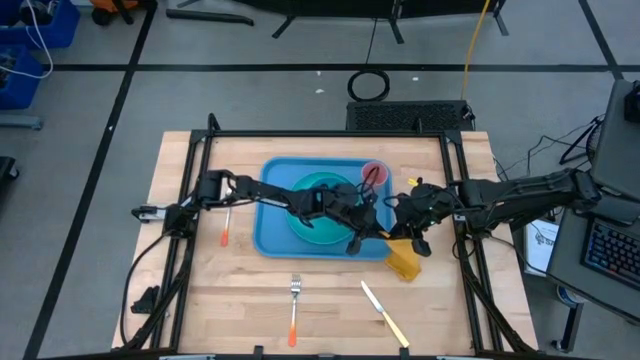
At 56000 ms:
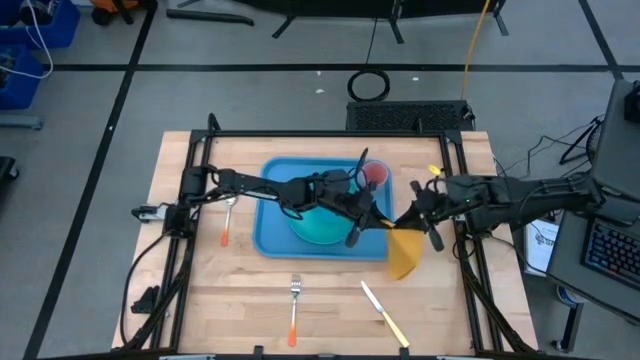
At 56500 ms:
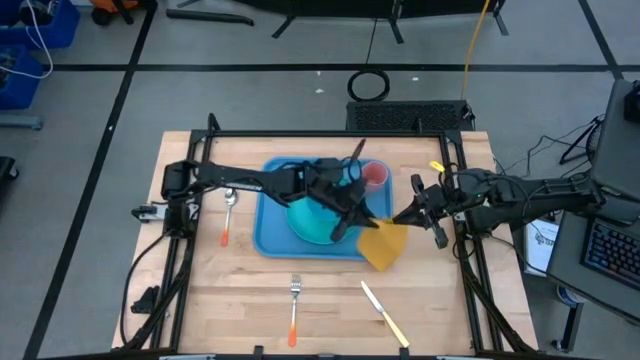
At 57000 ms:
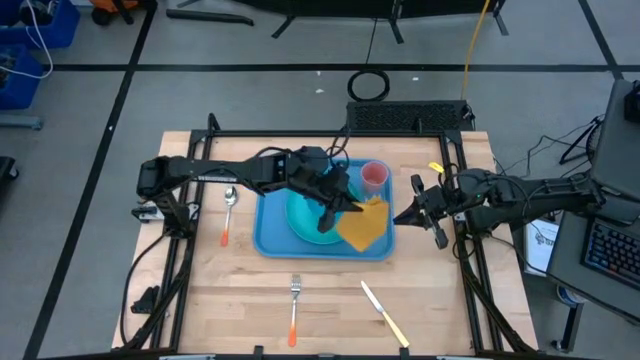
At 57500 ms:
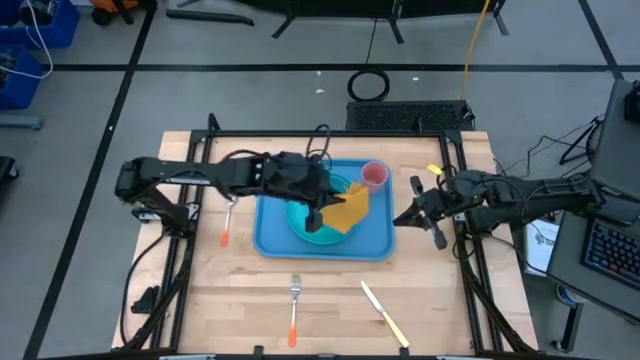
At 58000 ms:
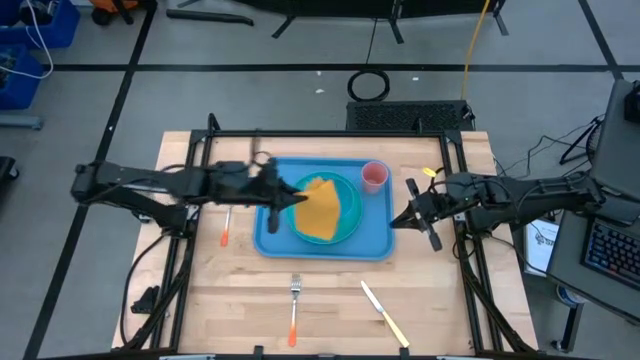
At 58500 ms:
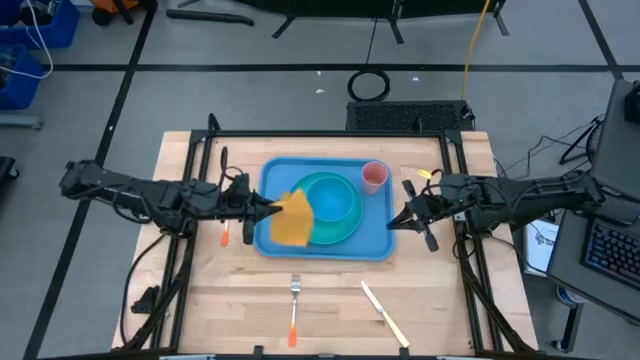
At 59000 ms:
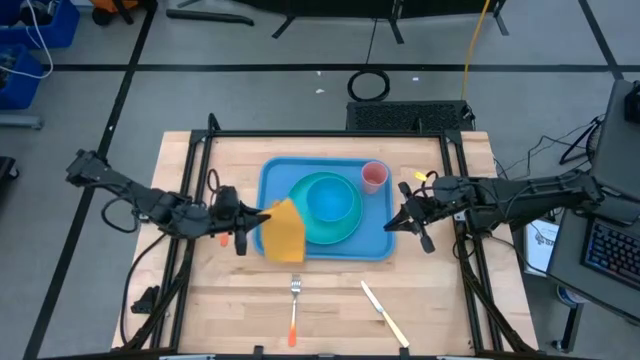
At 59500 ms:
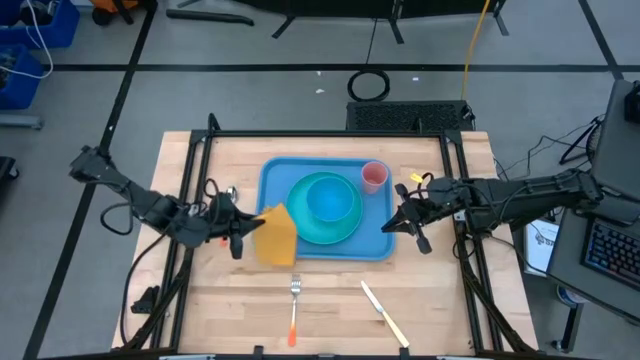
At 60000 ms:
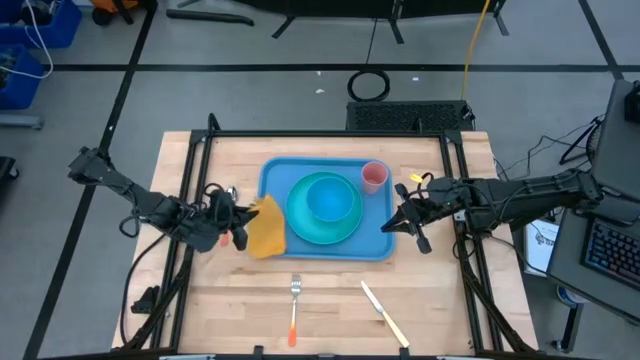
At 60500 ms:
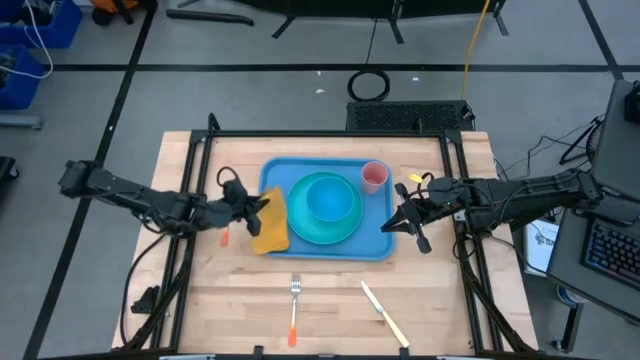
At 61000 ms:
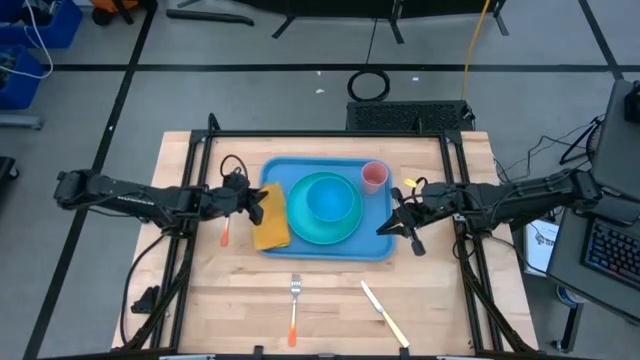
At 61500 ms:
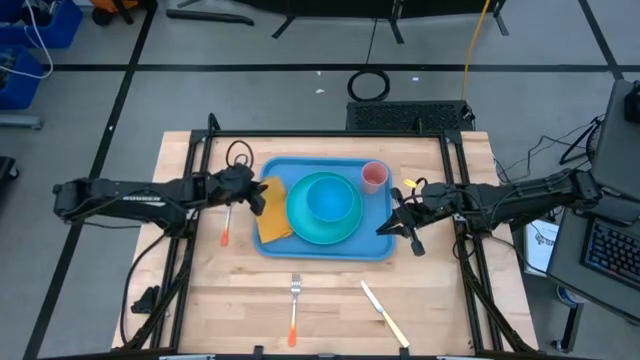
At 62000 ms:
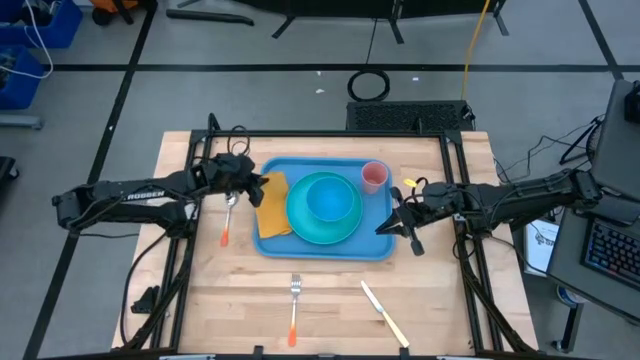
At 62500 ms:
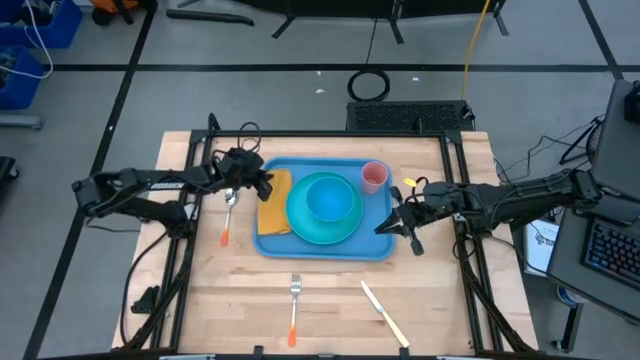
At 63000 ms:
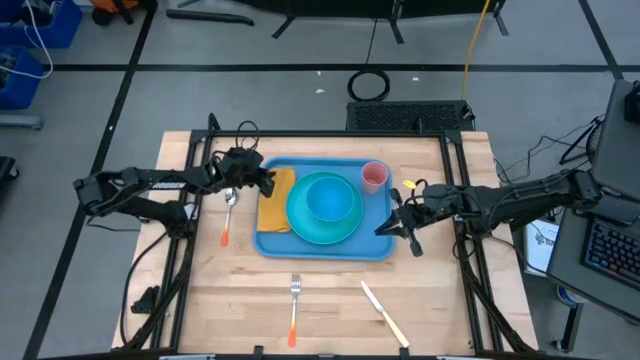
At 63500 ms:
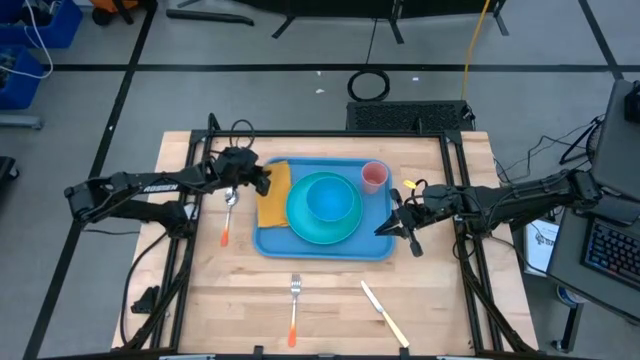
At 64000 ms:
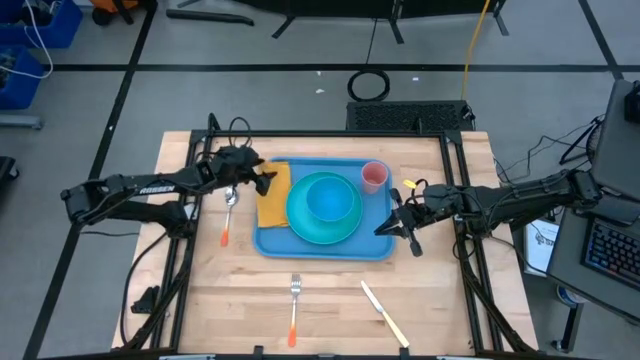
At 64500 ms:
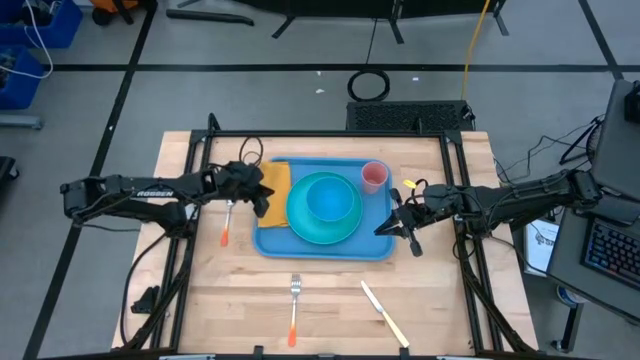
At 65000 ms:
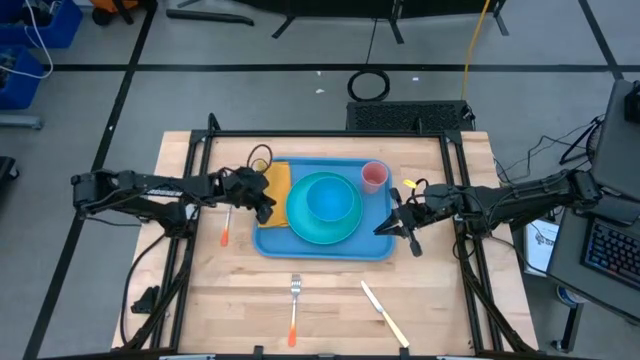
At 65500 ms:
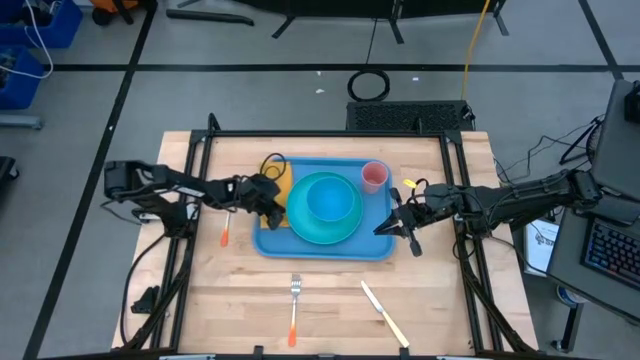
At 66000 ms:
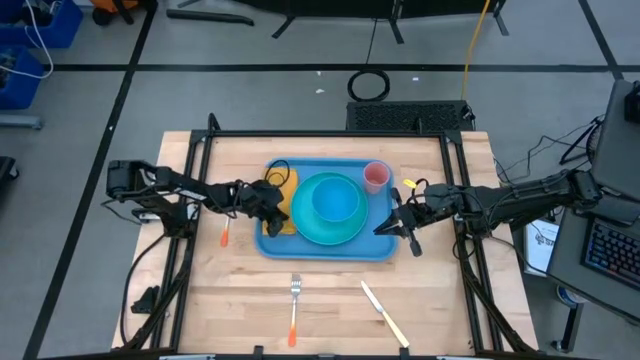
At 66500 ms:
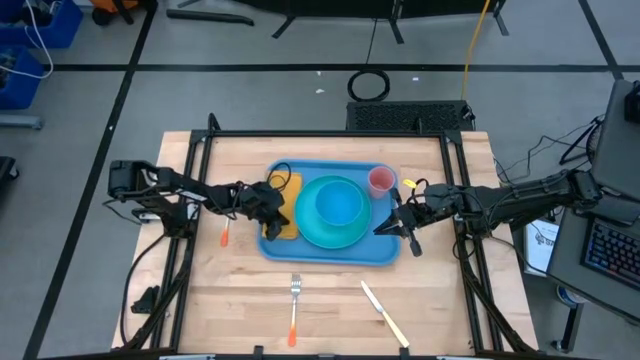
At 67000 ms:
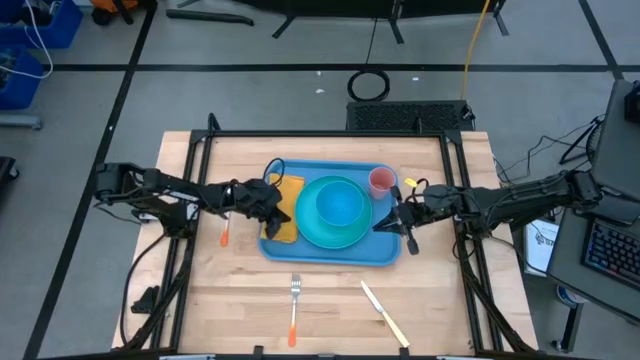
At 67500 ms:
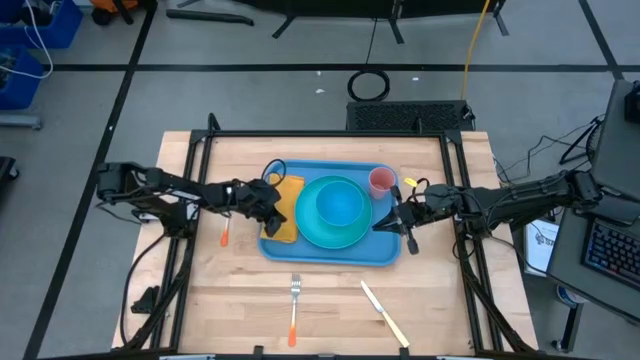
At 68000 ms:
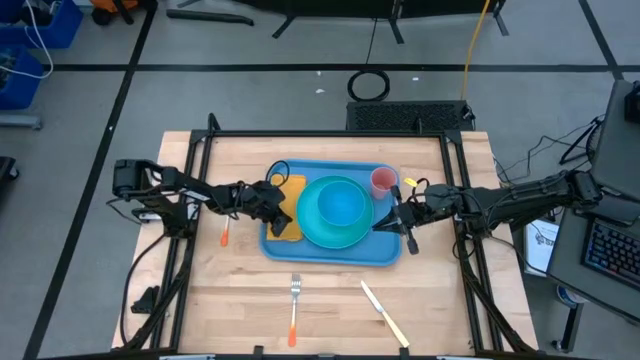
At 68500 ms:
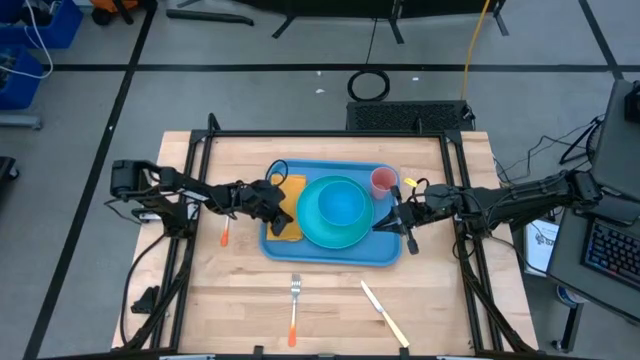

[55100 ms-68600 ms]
Task: Set up tray
Put the yellow napkin to the left of the green plate on the blue serving tray

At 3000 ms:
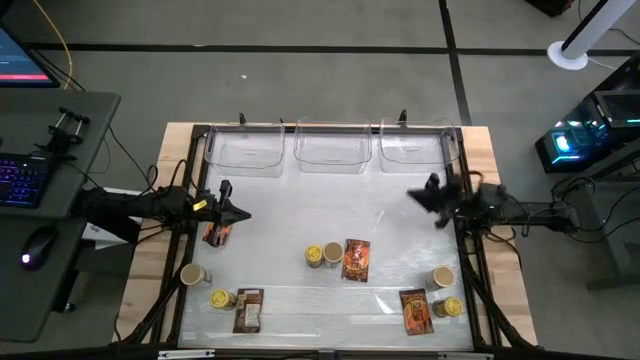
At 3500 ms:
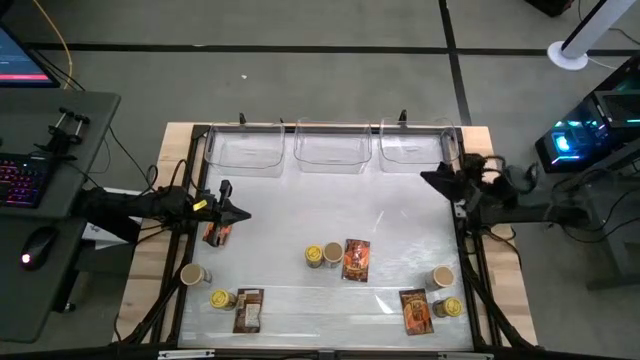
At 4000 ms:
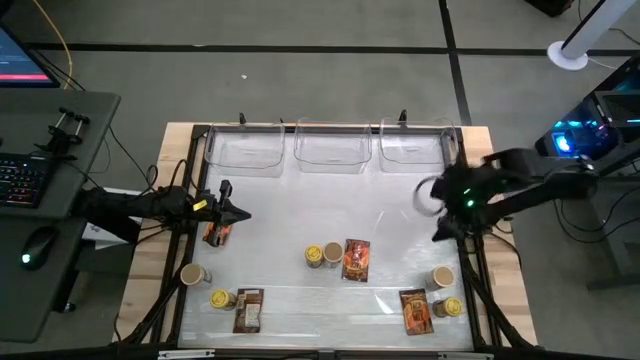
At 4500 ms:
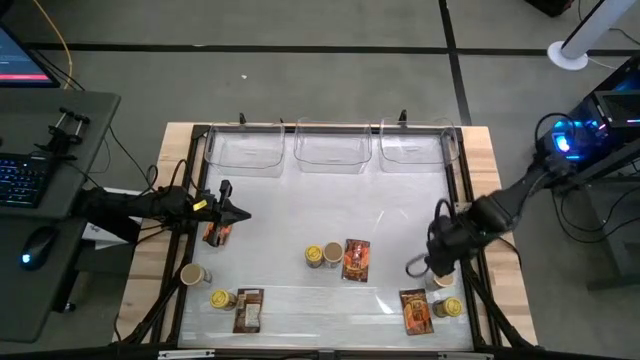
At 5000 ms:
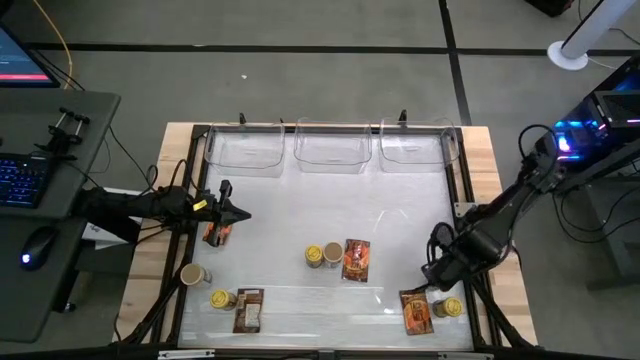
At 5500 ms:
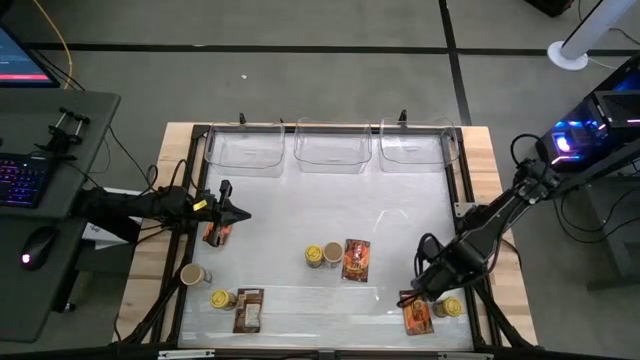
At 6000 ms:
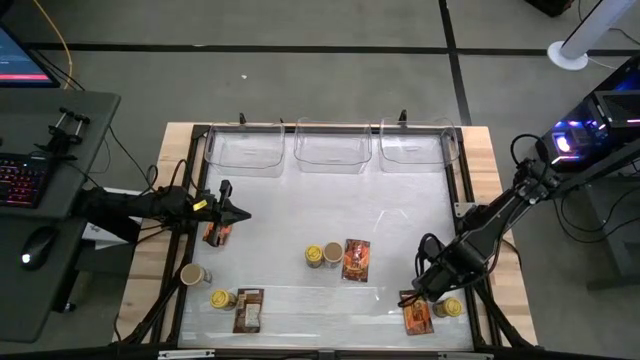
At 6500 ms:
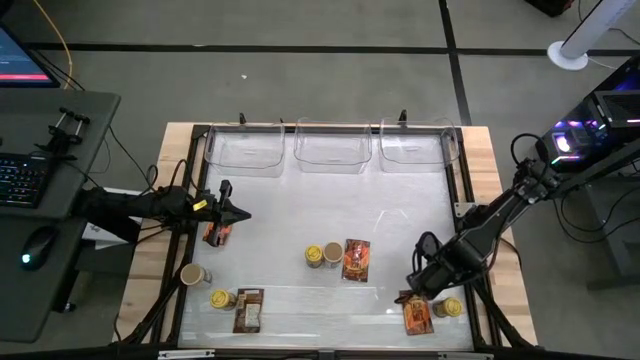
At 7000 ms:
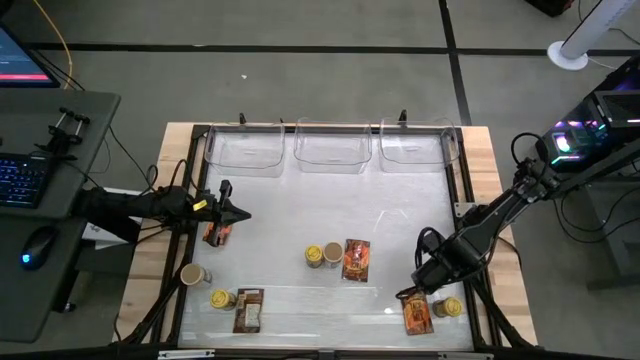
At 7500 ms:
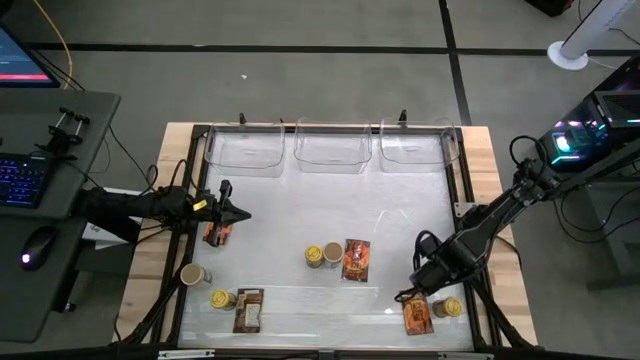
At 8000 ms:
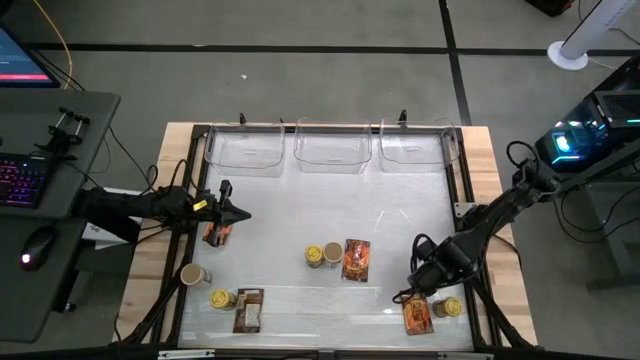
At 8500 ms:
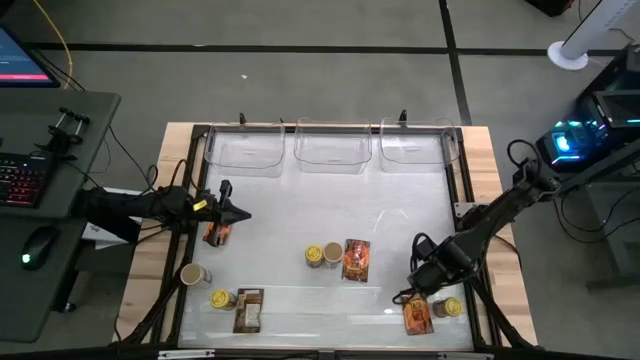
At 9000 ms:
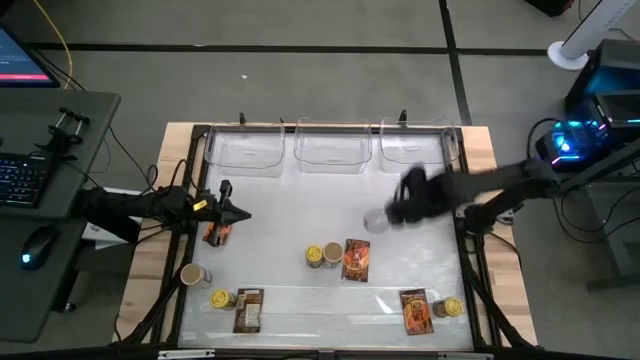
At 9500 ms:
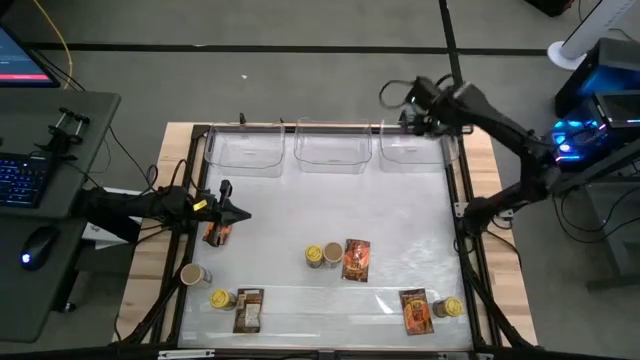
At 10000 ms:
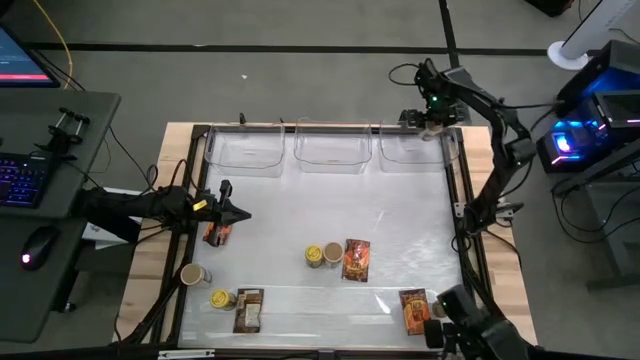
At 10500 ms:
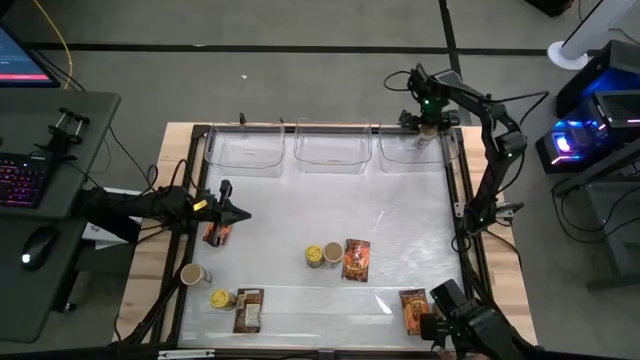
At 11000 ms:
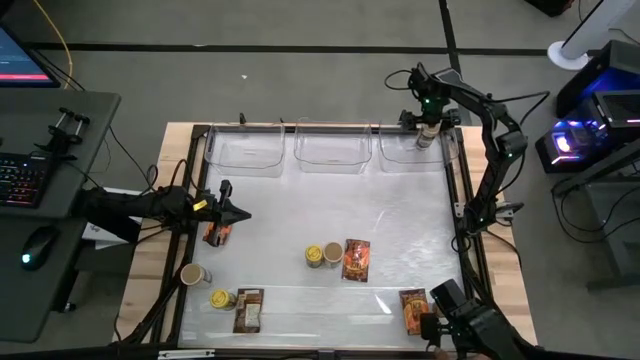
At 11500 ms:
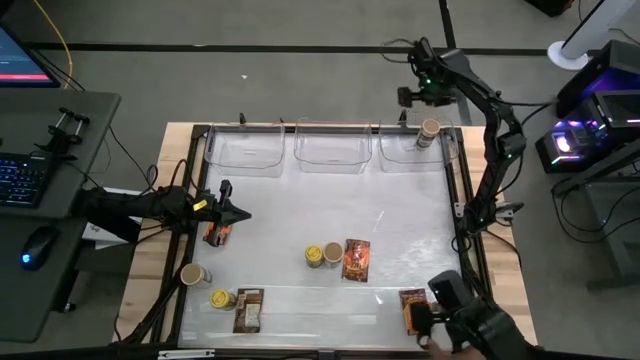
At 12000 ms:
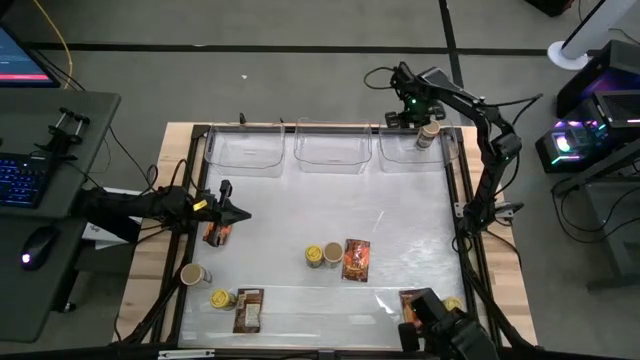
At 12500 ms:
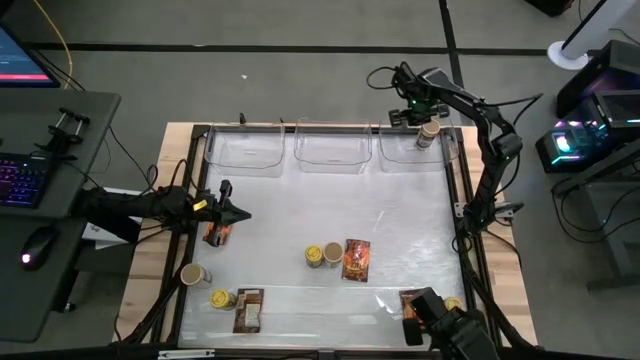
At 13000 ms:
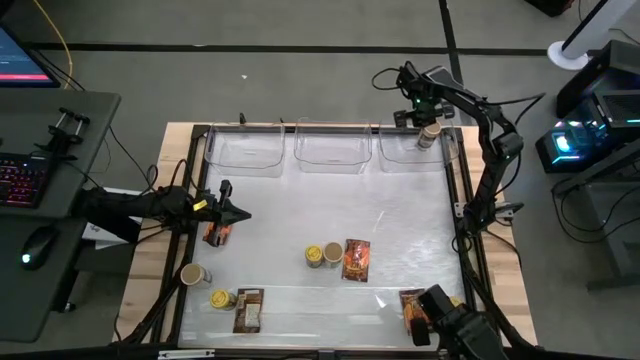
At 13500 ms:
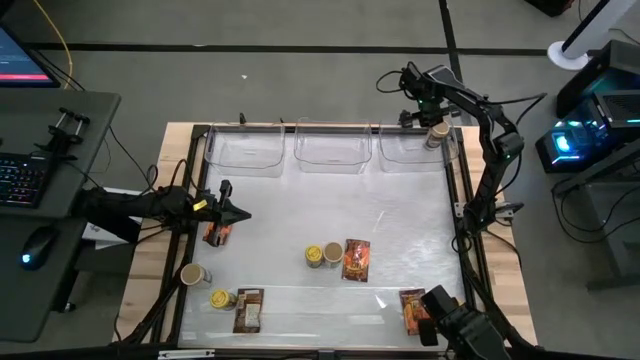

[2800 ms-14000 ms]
Task: Sort spices by type
Put the right gold seasoning bottle into the right transparent bin
